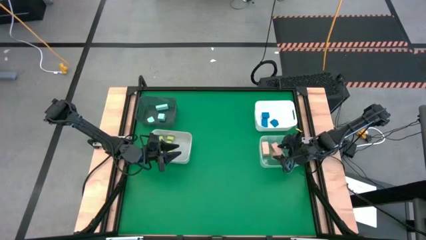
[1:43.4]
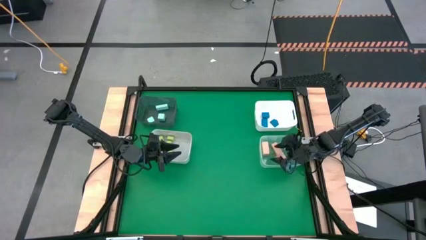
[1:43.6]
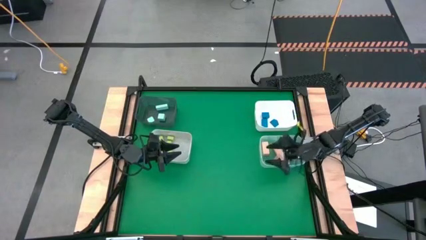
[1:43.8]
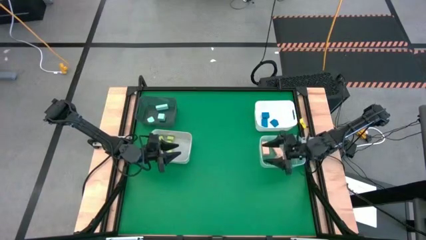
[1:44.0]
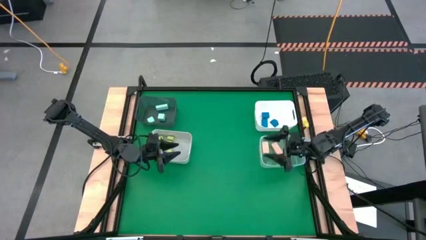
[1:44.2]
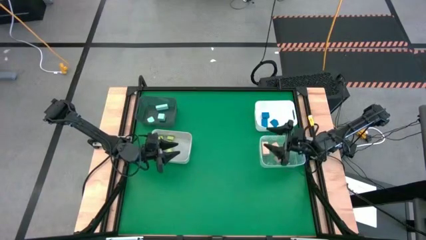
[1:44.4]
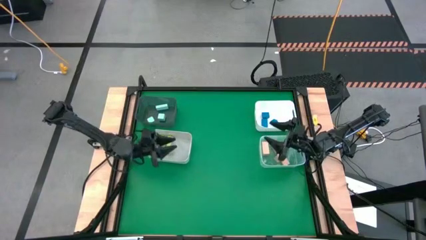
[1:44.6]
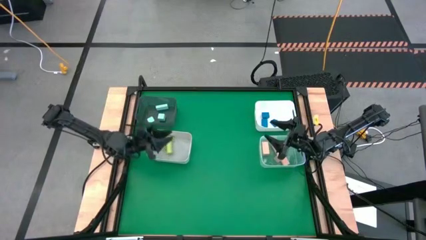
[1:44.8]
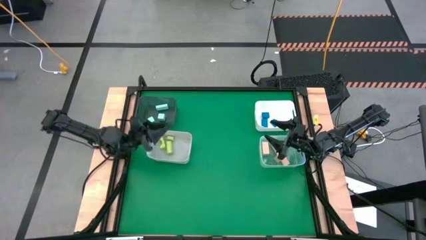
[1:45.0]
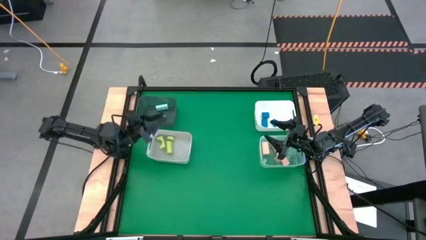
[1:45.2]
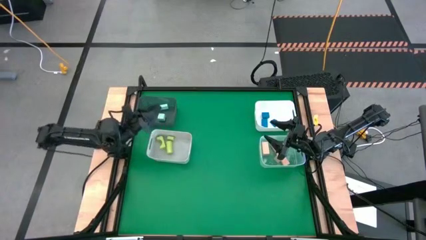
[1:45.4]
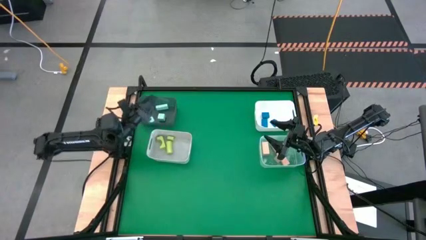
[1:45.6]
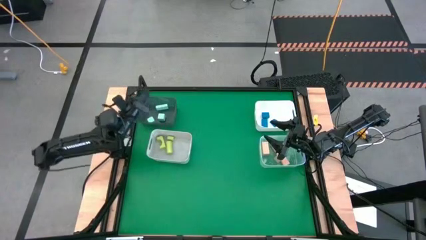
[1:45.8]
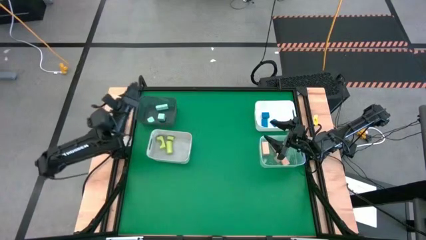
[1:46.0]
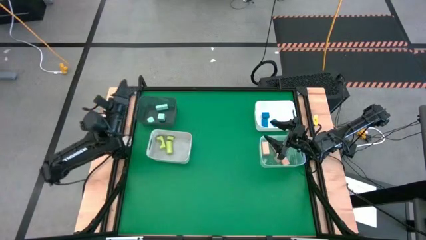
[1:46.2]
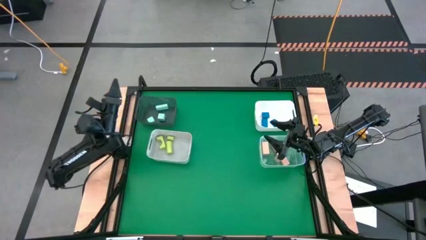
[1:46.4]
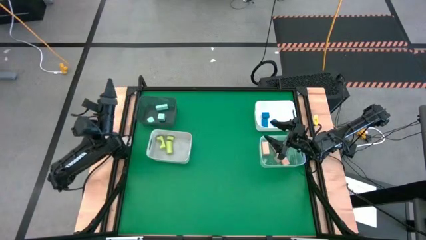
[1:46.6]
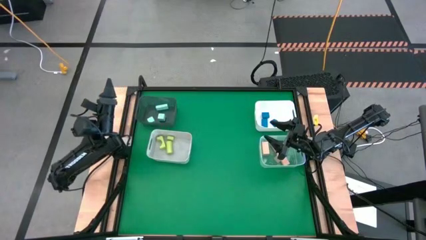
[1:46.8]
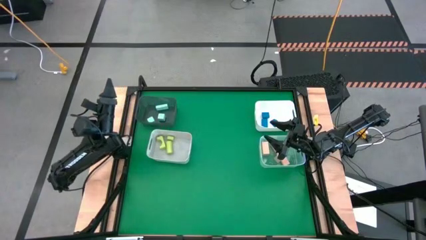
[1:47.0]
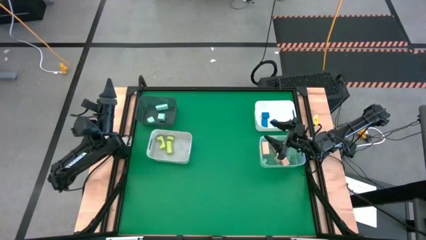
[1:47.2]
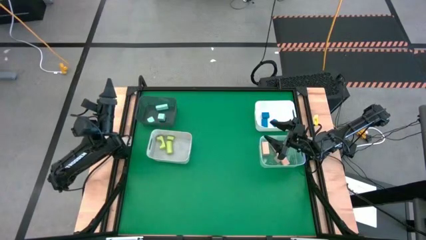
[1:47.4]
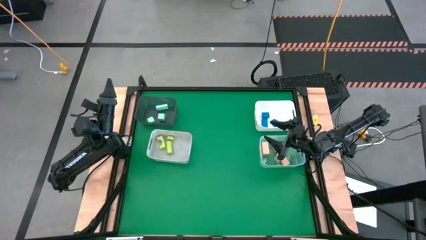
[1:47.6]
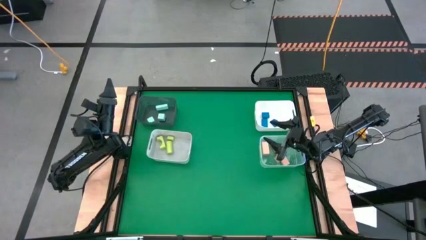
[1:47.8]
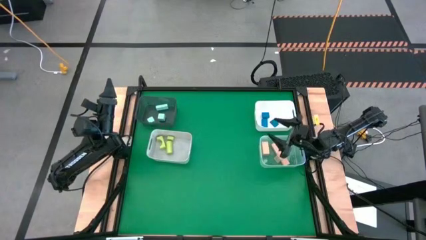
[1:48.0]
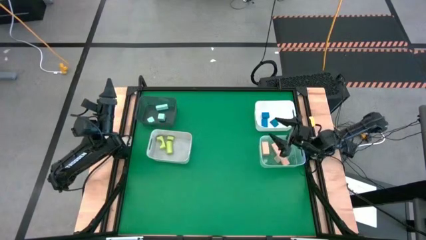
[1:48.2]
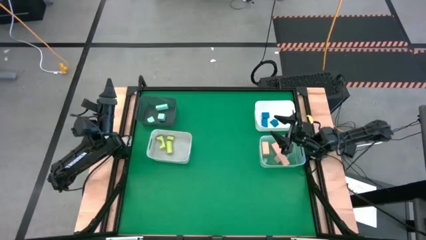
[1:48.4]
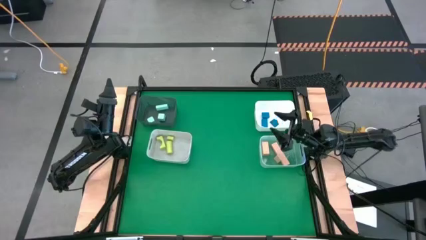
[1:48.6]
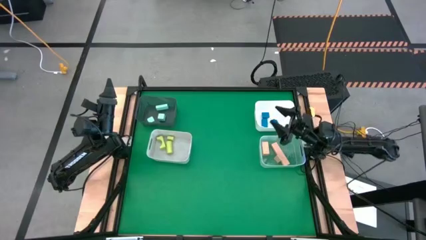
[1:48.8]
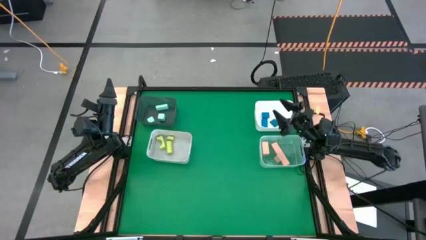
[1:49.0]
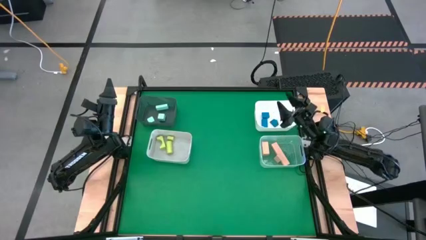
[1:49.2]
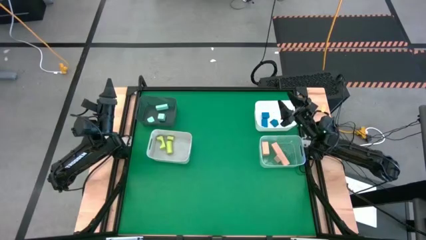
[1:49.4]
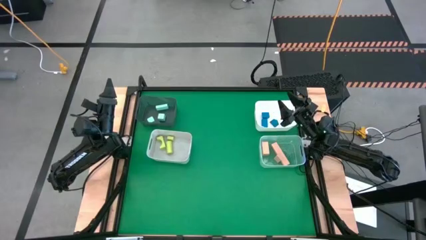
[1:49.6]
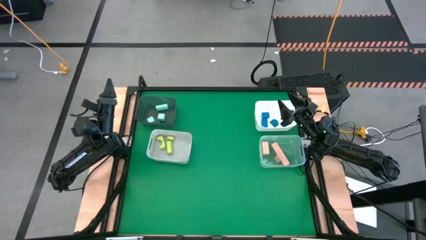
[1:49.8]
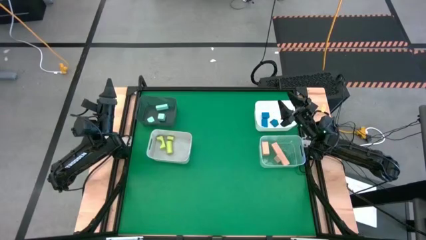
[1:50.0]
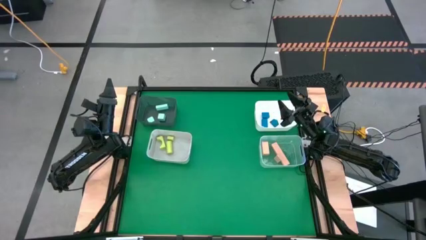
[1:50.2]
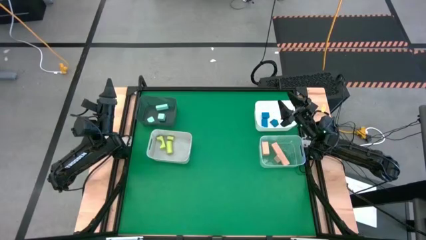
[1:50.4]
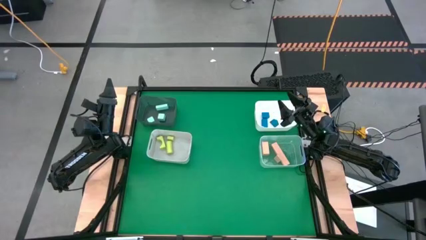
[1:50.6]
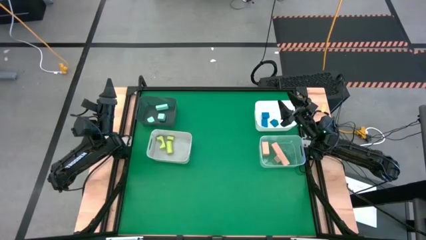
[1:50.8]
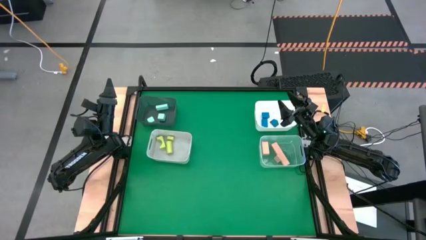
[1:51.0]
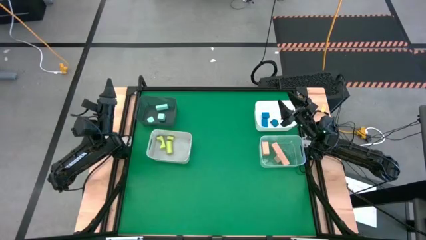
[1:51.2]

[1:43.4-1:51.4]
Task: Sort & place blocks by color
Return to Home Position

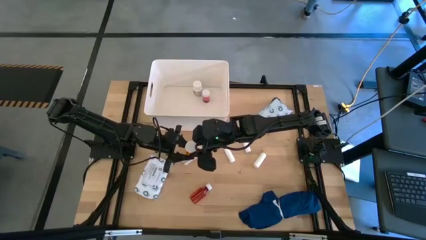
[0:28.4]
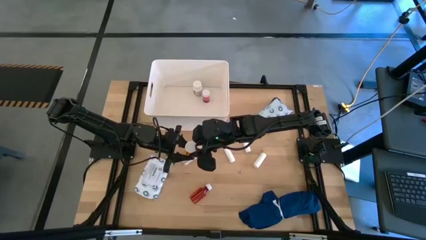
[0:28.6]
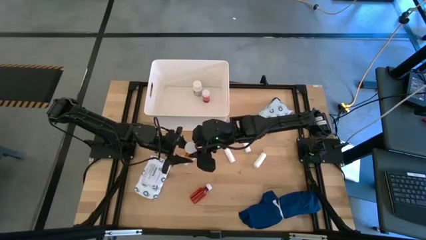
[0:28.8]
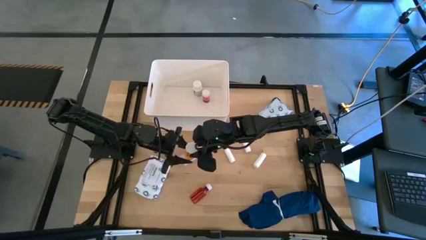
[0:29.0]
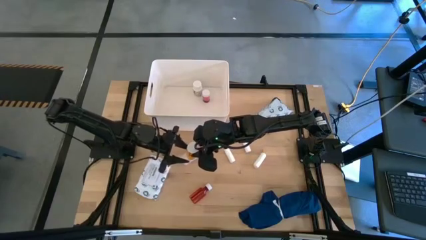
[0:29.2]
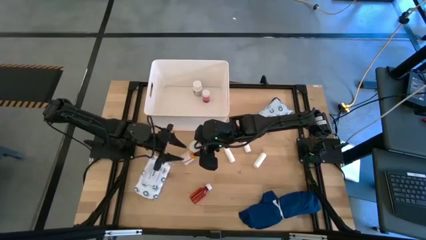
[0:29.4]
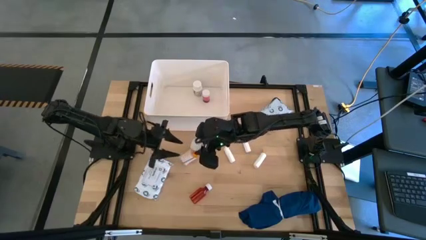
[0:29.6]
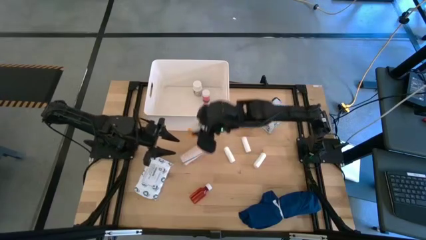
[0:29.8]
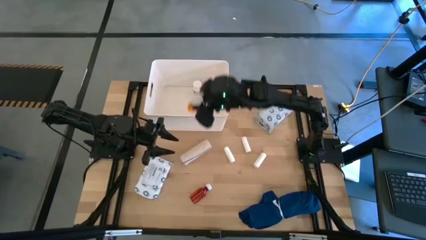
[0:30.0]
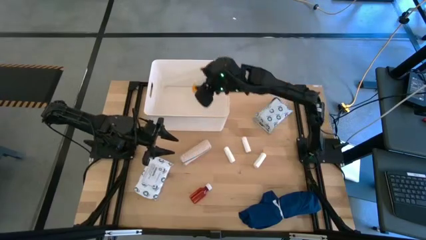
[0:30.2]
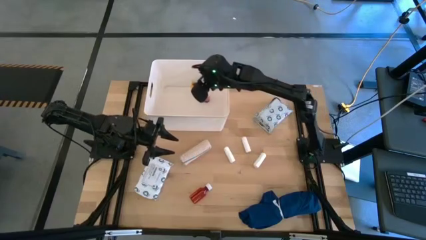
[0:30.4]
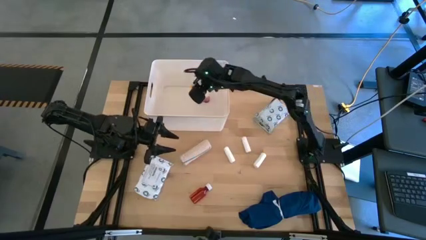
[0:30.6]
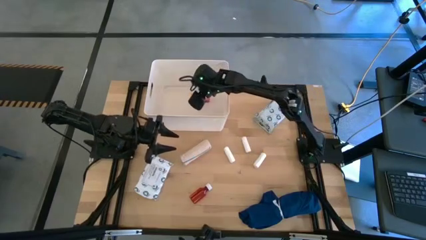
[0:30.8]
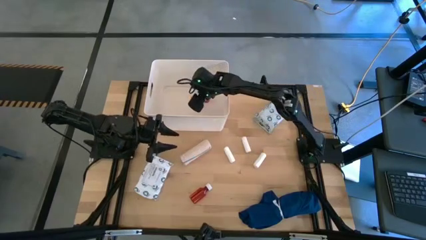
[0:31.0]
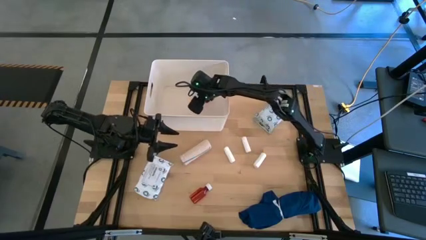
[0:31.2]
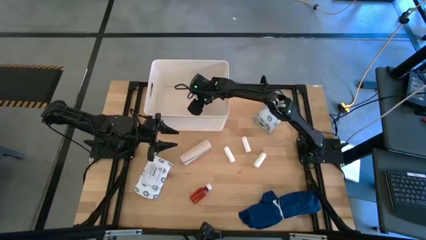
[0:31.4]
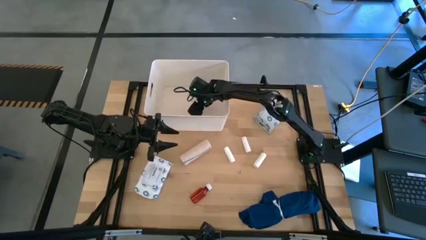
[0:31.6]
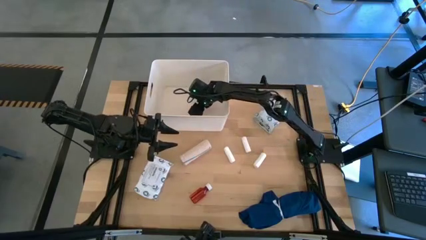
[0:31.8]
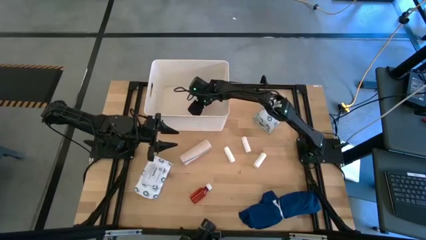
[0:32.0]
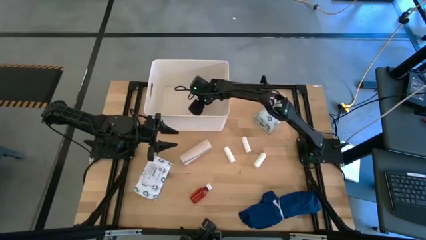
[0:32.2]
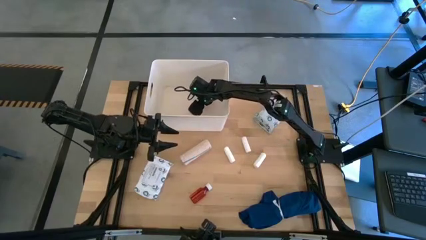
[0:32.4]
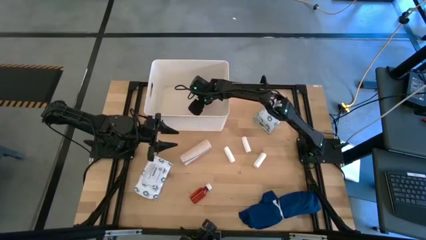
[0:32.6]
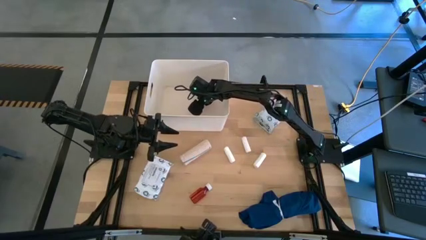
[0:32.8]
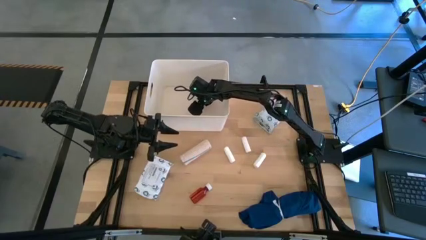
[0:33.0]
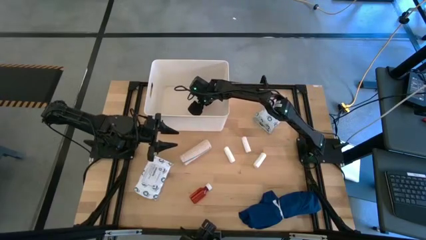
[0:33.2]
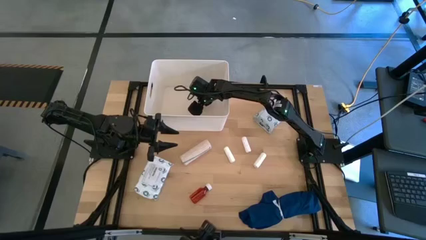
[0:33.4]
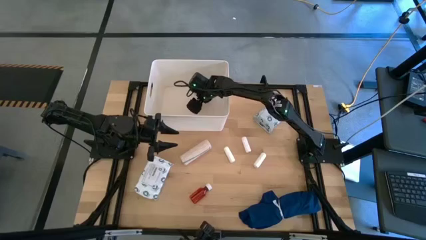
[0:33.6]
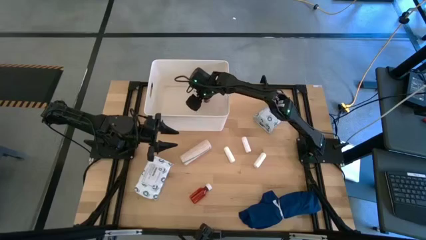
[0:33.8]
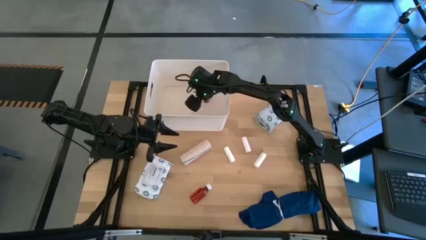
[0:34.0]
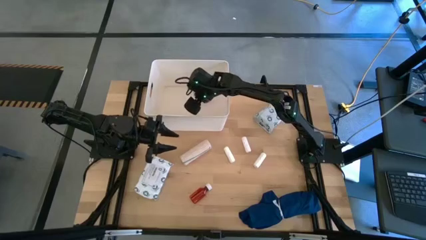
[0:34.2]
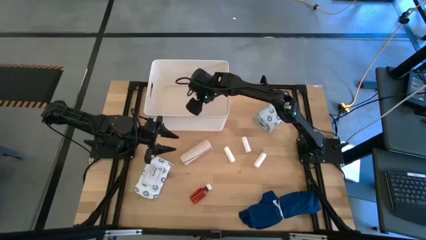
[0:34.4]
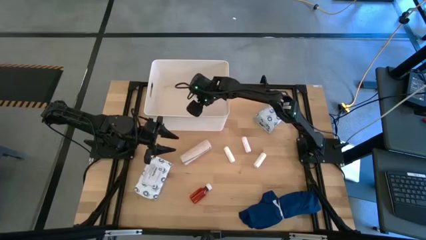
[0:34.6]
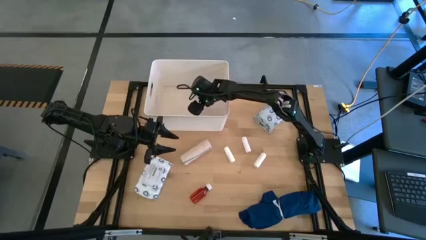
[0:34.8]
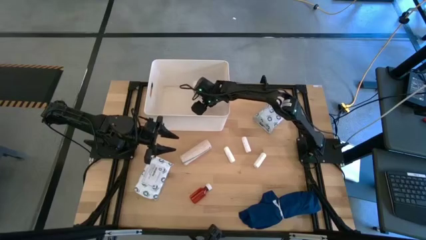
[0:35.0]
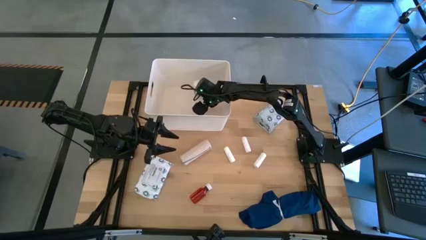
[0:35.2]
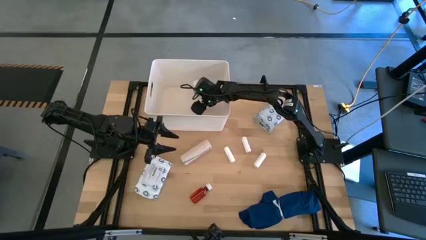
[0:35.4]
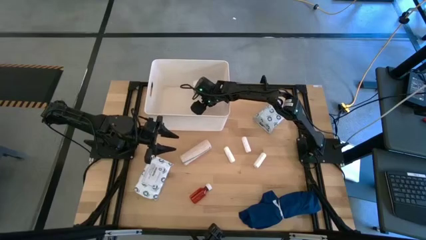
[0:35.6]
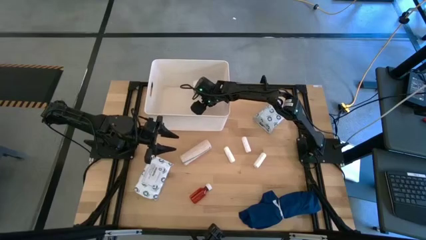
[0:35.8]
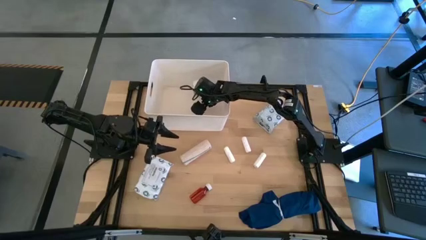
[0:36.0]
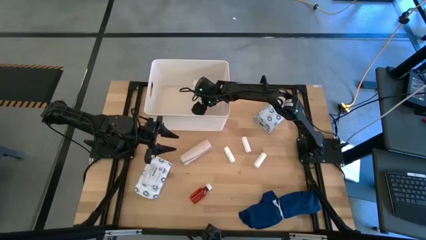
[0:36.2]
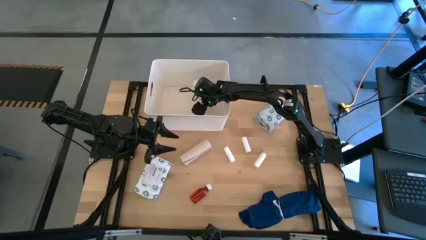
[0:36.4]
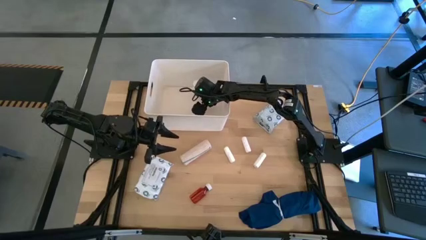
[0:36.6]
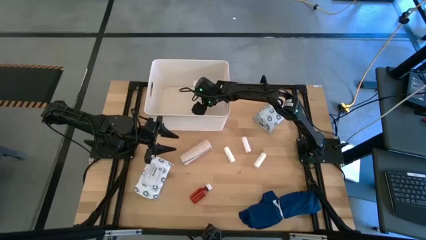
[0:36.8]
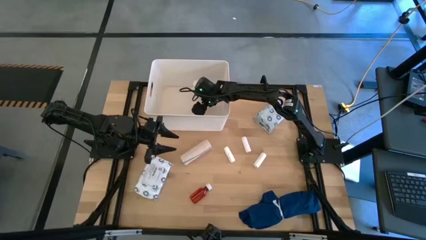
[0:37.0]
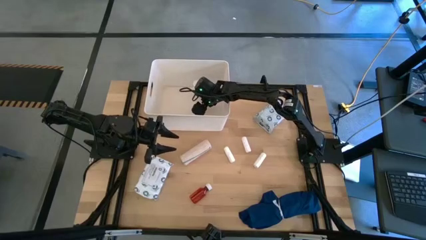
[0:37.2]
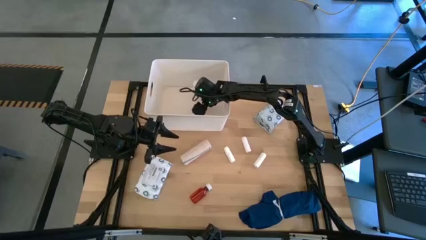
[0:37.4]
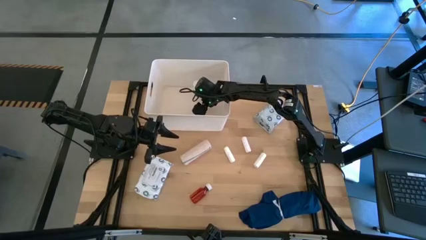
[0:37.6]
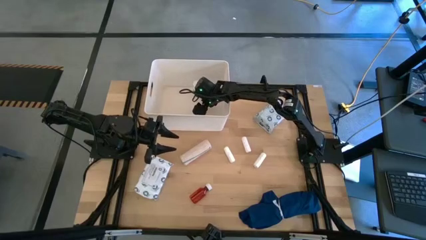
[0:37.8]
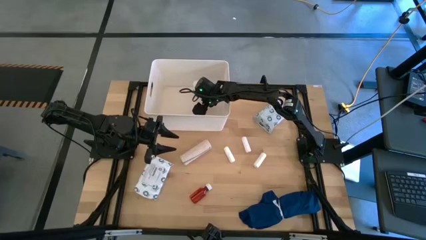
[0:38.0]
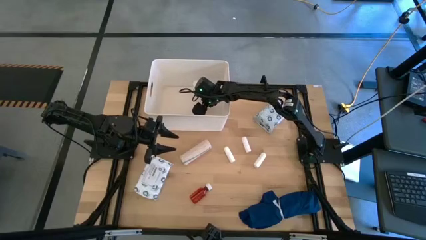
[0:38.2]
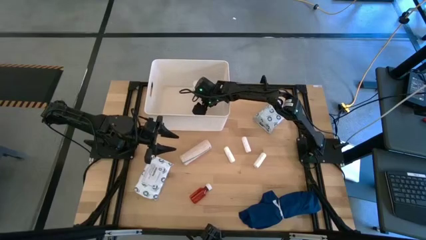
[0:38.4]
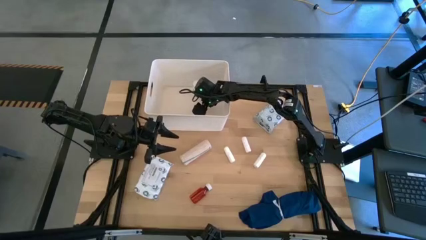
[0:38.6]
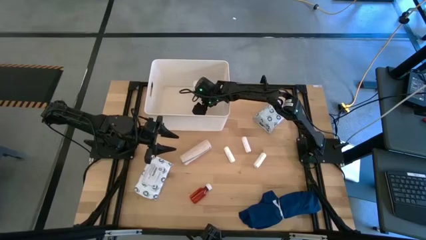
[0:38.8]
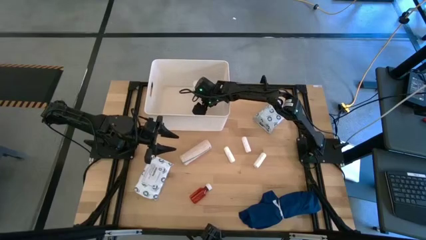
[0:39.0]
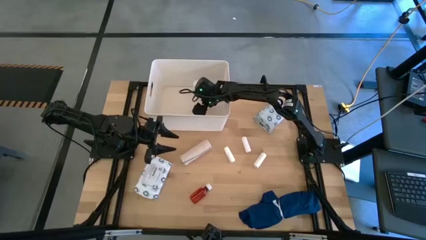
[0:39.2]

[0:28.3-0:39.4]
Task: Pick & place medical supplies in basket/bin
Put the orange medicine bottle into the white bin
